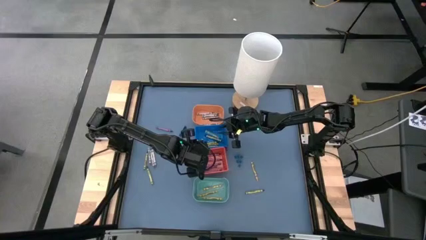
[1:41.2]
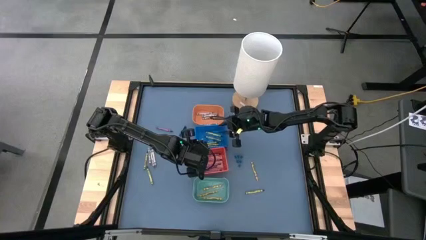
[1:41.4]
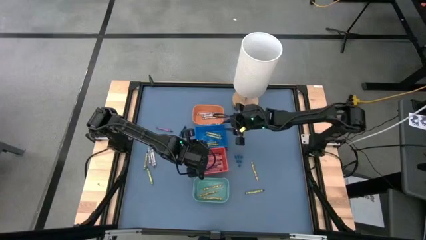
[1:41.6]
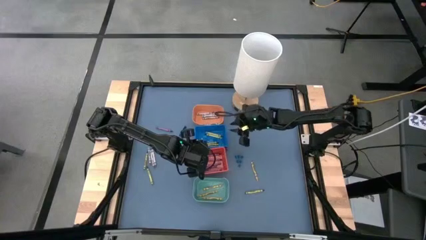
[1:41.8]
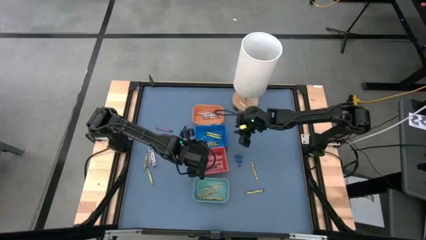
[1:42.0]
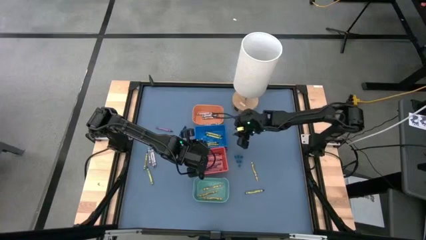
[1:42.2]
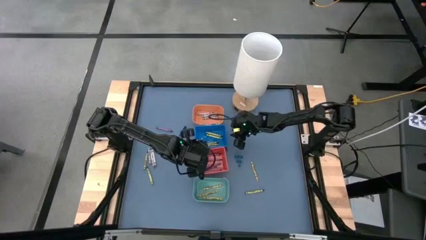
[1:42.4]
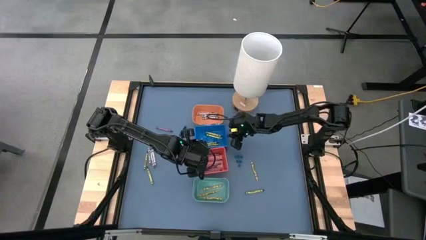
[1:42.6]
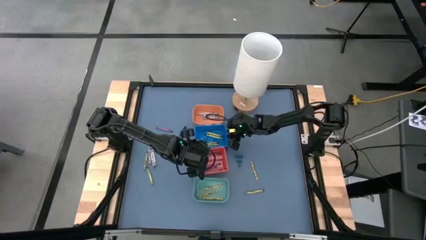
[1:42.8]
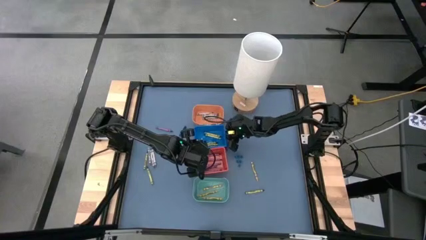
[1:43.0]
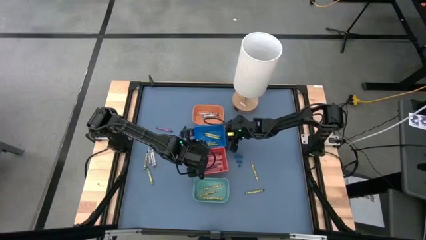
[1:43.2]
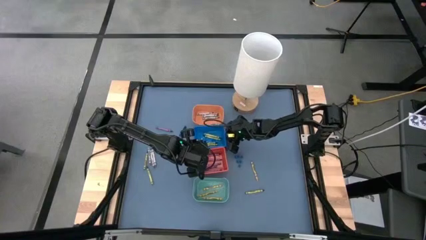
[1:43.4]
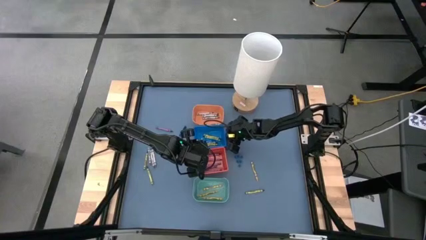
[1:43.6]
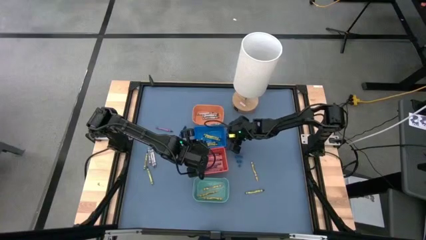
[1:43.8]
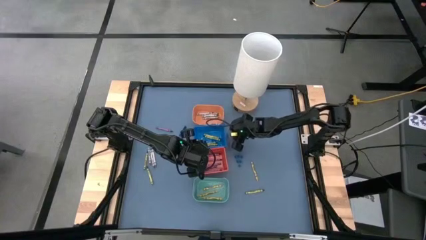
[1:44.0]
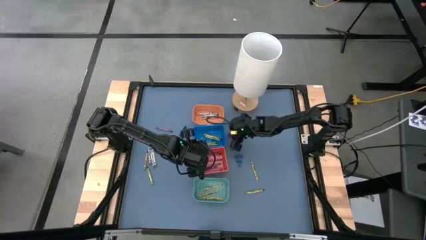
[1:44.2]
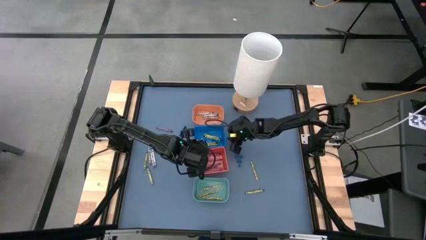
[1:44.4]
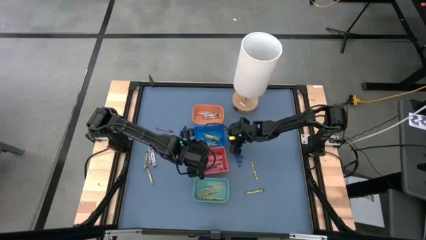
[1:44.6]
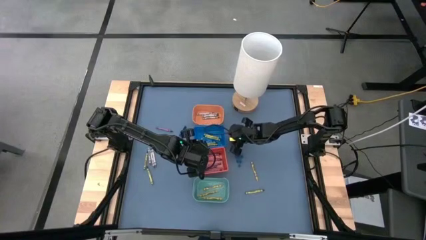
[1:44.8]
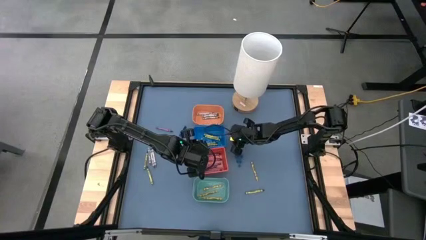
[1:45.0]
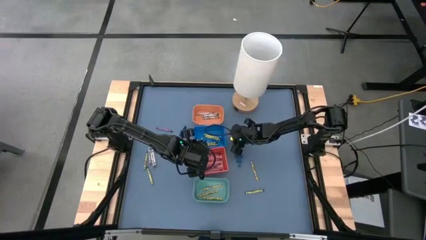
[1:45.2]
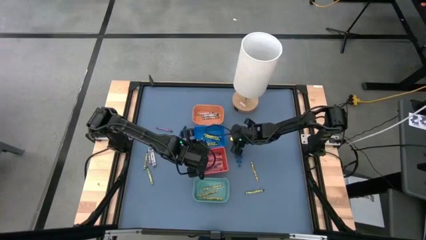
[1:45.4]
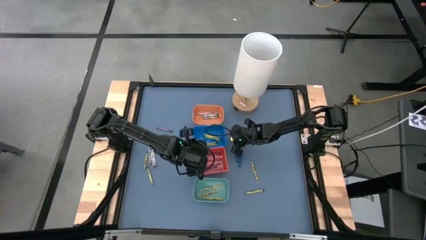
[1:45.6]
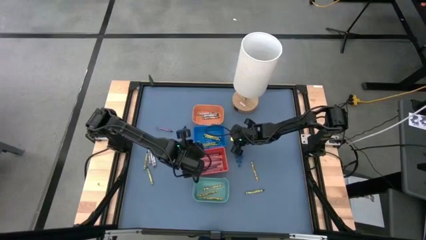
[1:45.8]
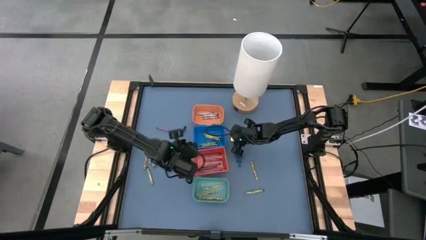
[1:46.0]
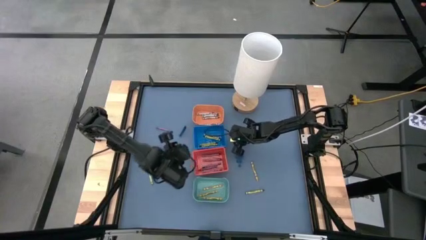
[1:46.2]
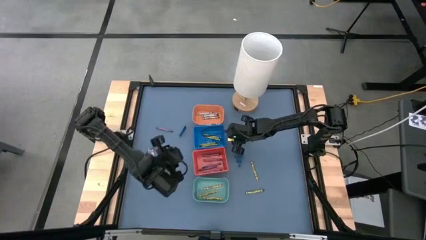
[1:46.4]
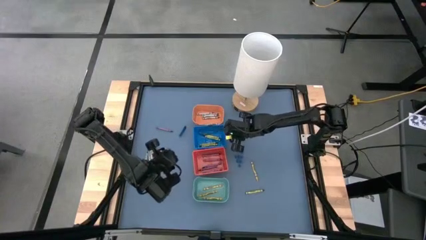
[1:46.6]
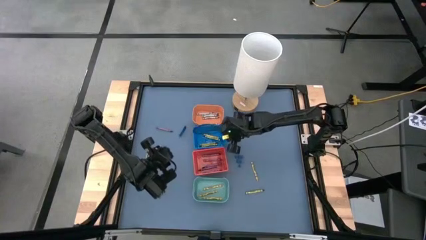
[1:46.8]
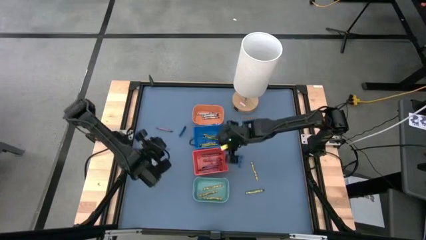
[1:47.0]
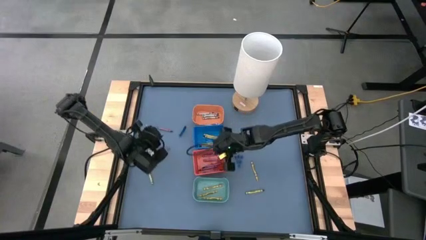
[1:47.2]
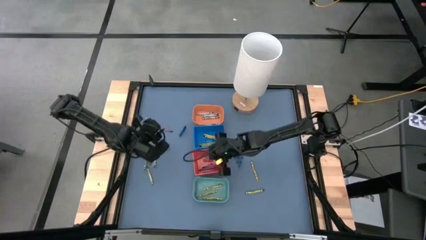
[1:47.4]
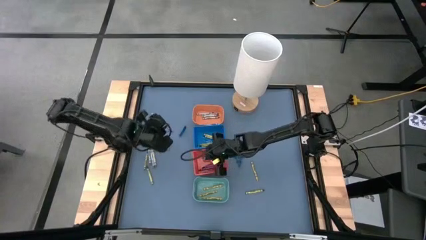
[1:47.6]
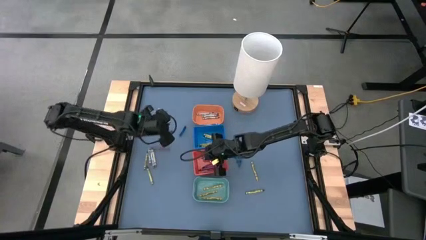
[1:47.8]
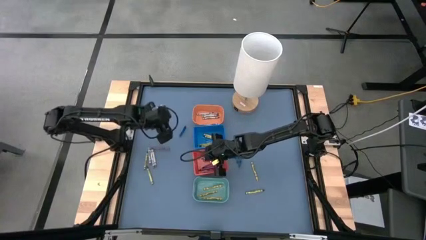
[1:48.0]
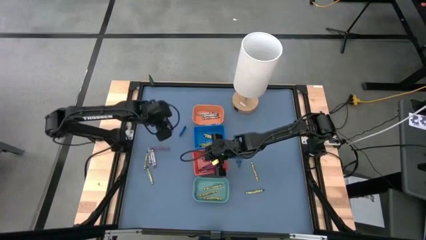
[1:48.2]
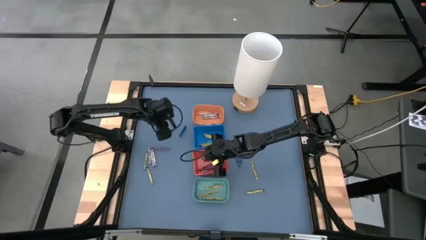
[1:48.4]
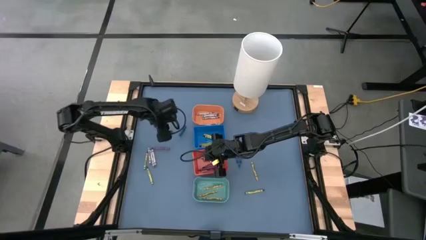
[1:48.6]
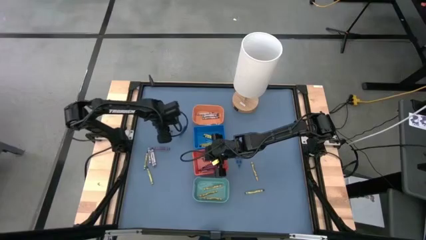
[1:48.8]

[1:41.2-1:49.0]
Task: Sort crayons
Put the purple crayon into the red bin

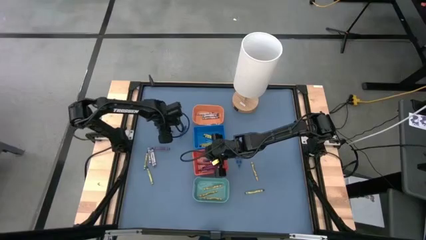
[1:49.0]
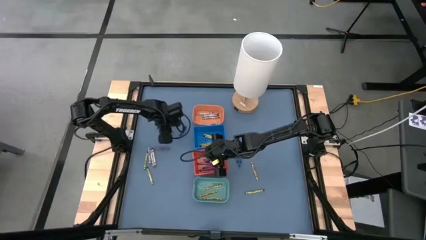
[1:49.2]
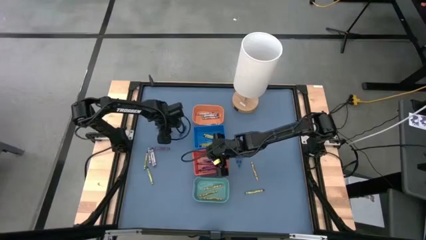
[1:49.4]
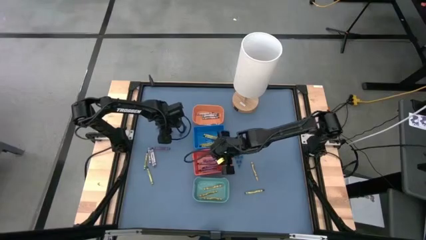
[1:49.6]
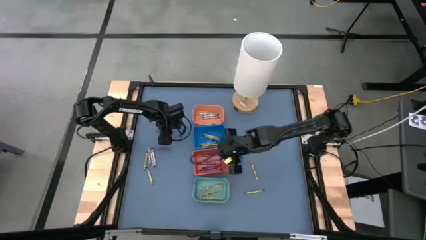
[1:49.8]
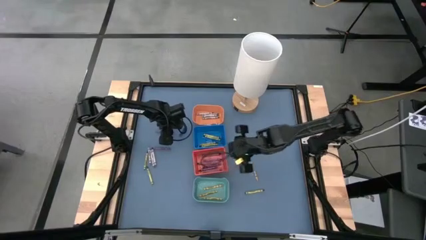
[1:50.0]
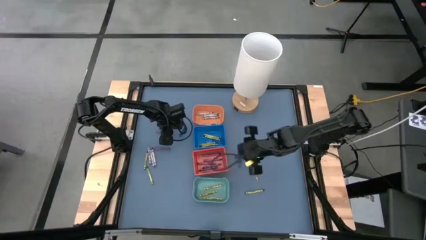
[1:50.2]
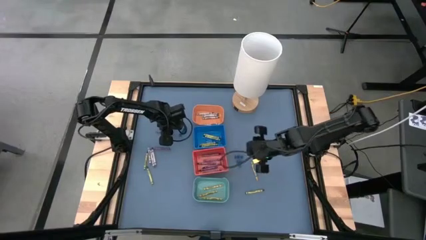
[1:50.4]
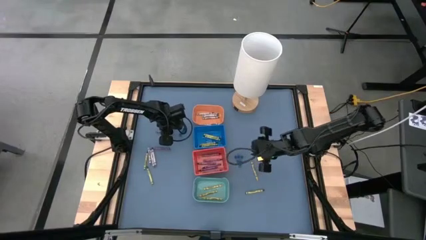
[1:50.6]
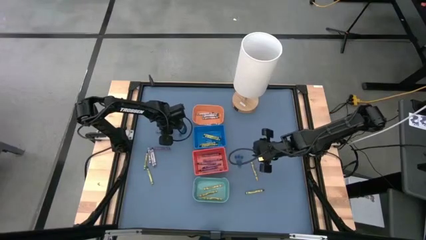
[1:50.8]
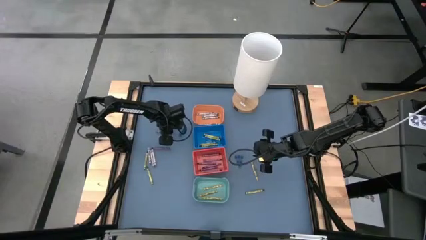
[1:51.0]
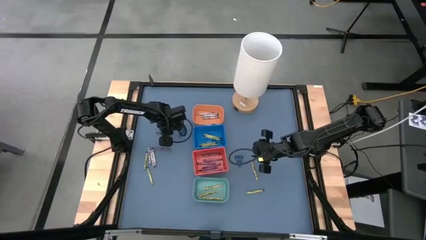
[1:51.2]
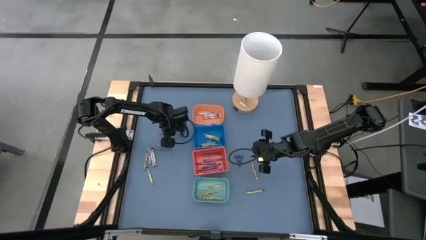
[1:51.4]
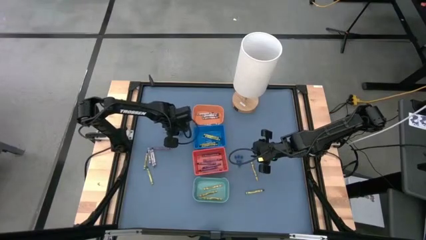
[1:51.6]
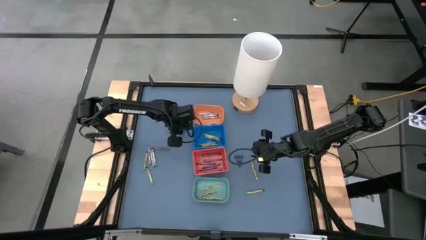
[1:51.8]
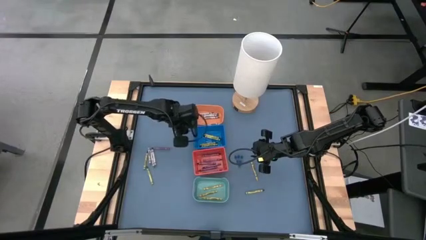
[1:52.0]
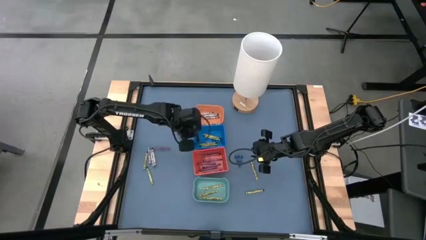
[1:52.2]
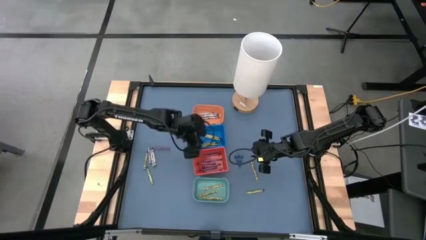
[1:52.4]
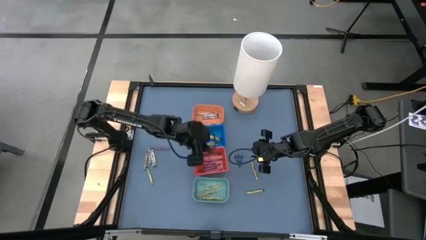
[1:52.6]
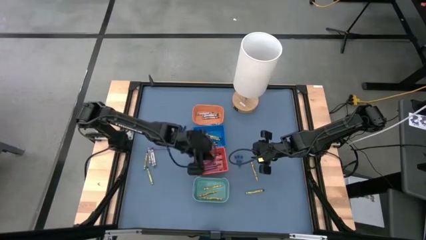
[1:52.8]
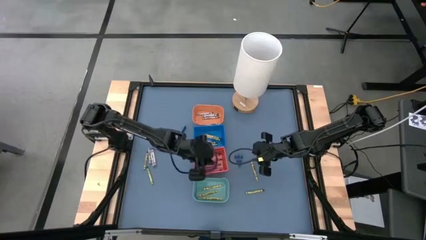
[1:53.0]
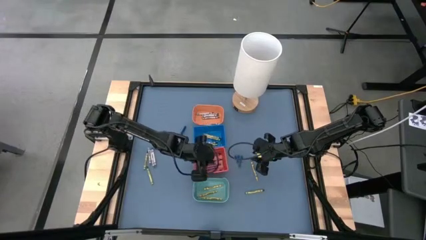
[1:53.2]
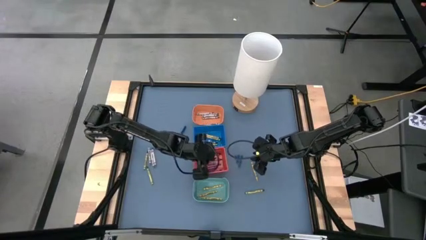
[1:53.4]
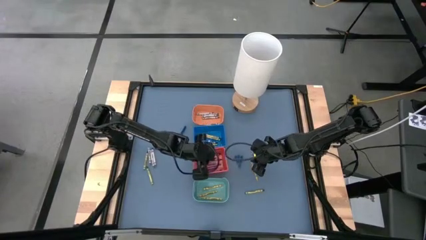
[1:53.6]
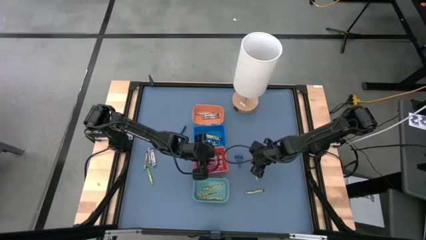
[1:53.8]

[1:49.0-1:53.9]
Put the purple crayon into the red bin

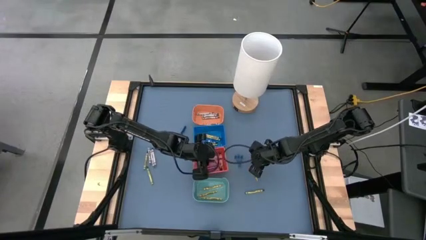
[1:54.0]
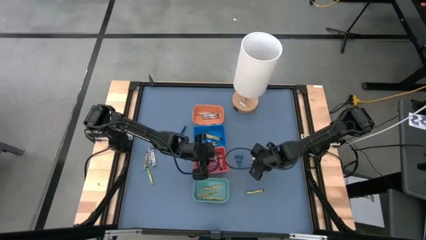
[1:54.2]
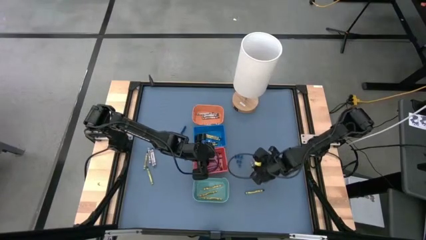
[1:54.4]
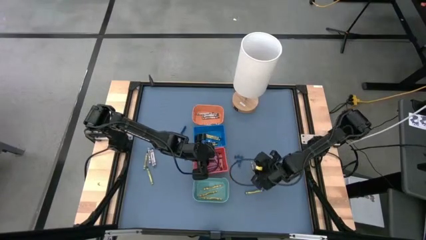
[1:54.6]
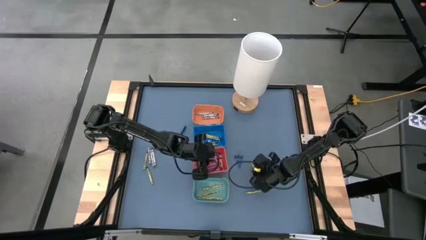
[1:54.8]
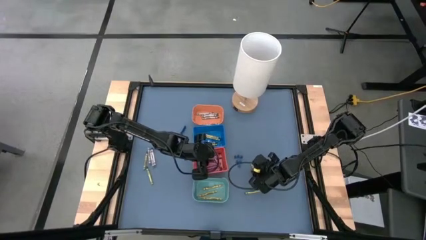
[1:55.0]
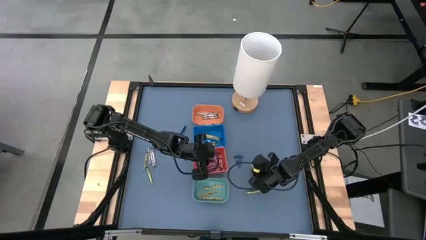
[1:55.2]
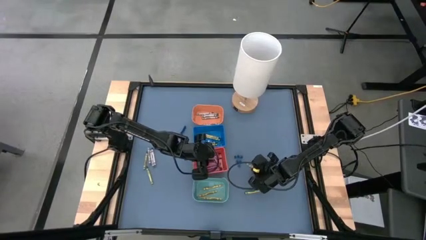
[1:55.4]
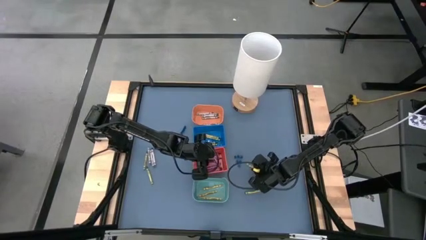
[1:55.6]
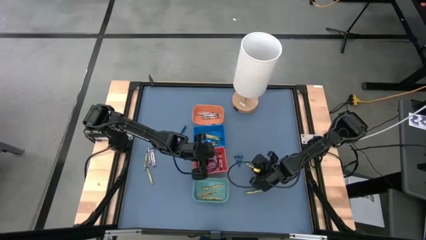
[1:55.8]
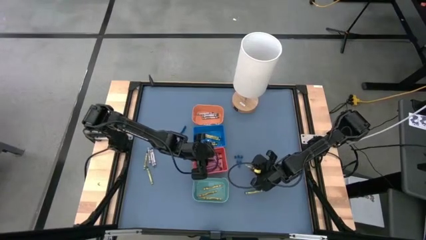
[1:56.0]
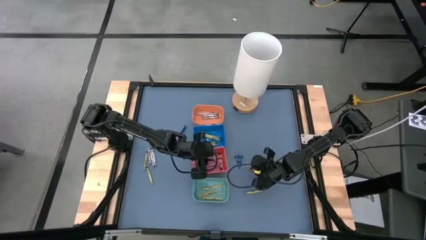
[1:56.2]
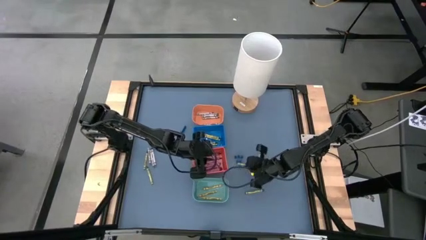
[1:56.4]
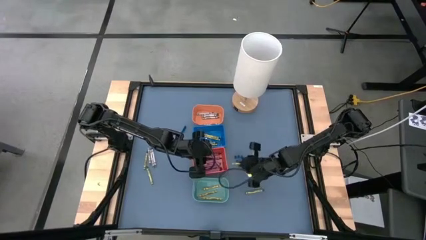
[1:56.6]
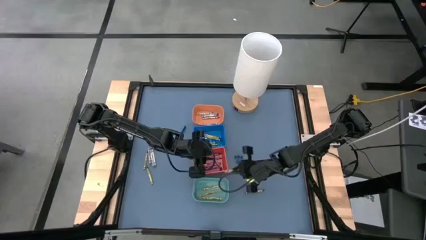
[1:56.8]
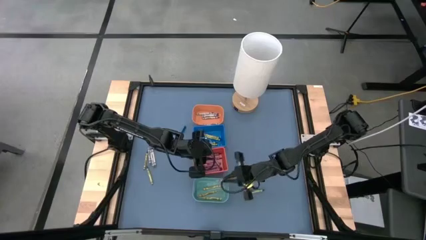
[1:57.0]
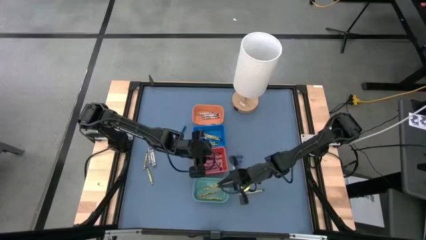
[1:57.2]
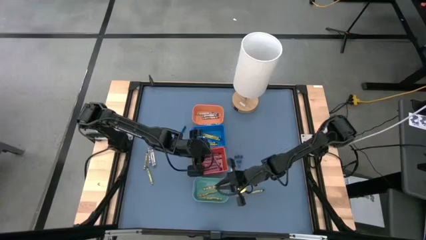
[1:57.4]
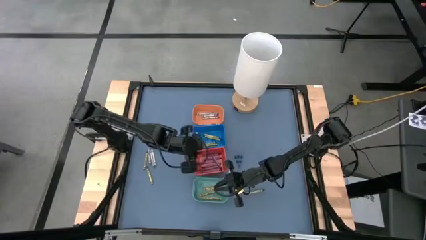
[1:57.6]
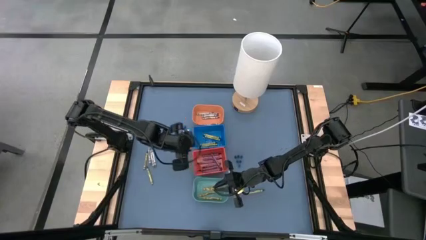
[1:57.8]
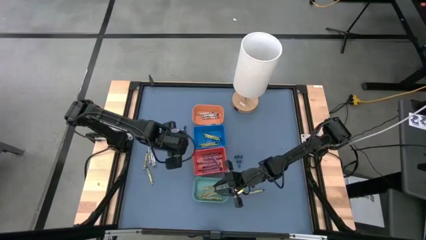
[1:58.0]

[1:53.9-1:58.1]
Put the yellow crayon into the green bin
